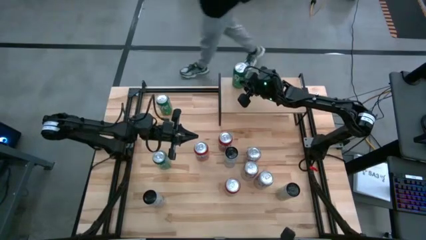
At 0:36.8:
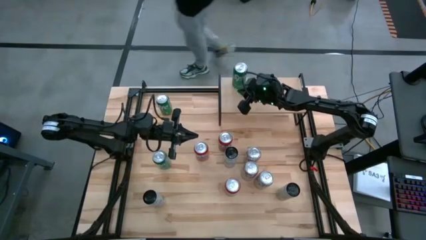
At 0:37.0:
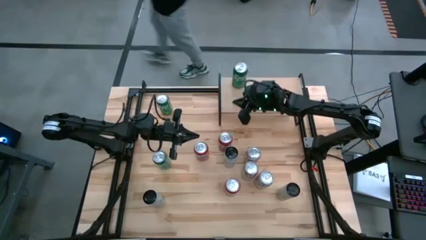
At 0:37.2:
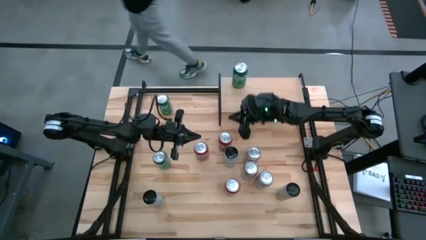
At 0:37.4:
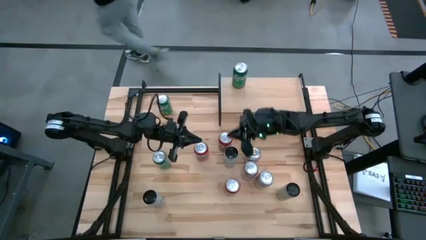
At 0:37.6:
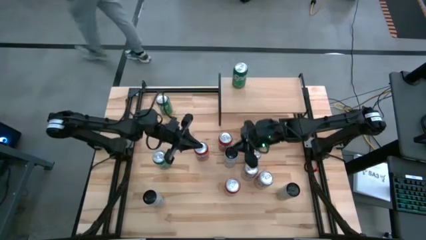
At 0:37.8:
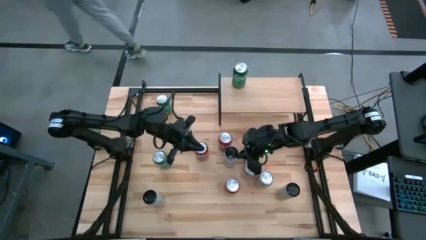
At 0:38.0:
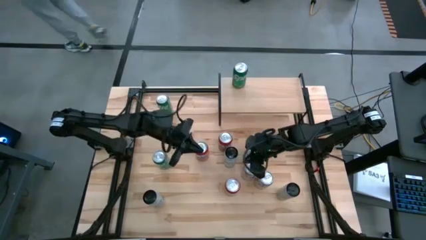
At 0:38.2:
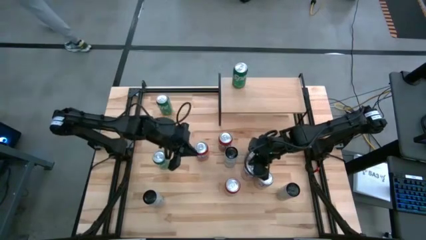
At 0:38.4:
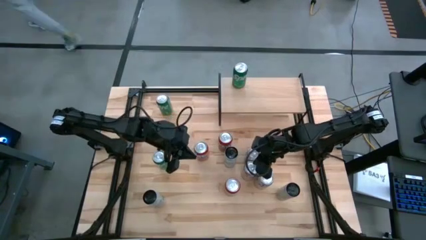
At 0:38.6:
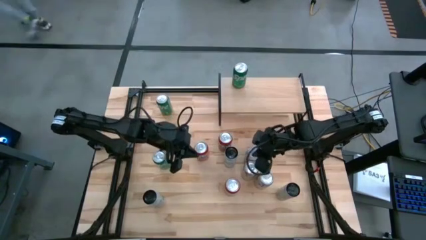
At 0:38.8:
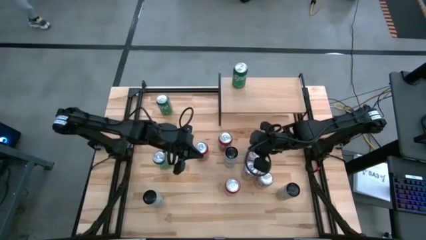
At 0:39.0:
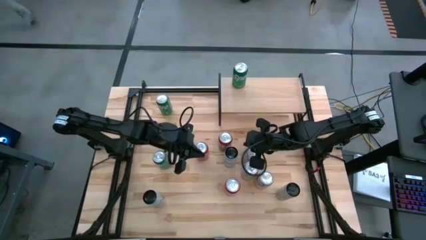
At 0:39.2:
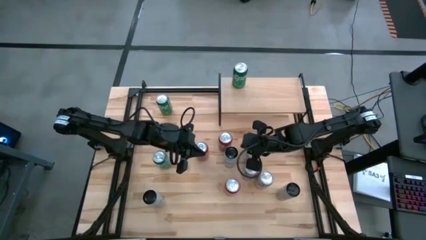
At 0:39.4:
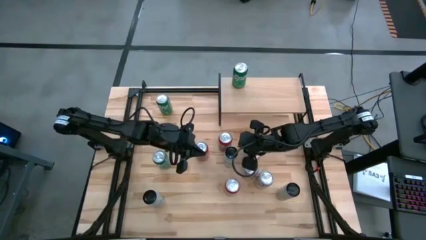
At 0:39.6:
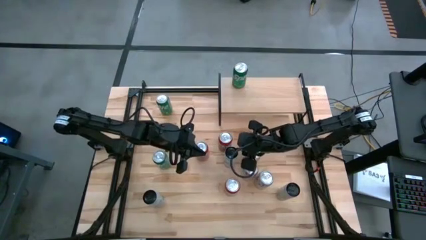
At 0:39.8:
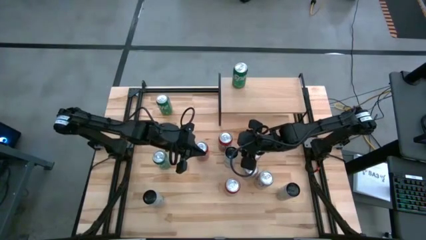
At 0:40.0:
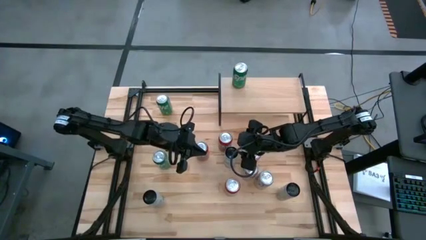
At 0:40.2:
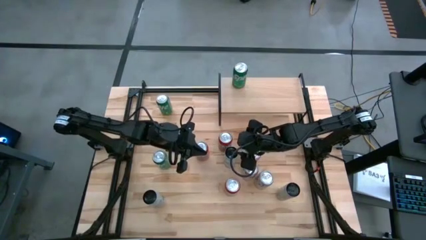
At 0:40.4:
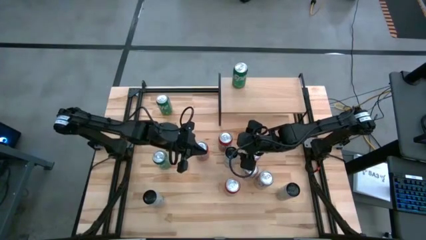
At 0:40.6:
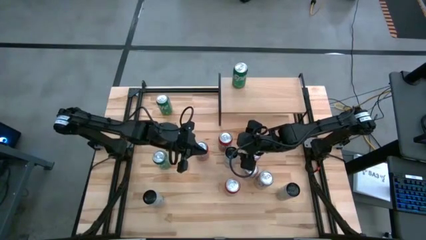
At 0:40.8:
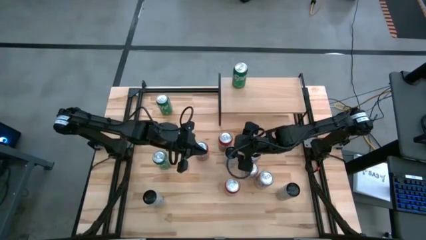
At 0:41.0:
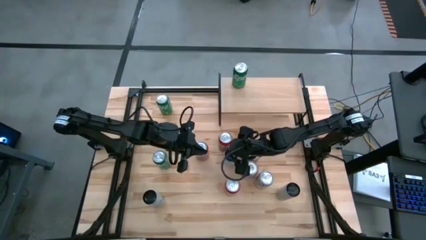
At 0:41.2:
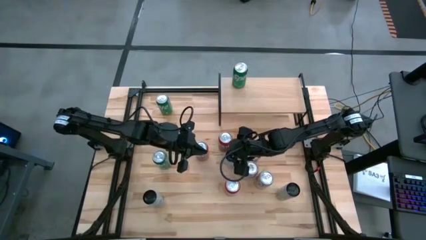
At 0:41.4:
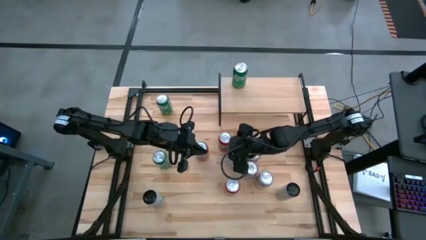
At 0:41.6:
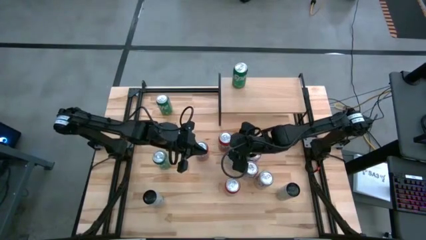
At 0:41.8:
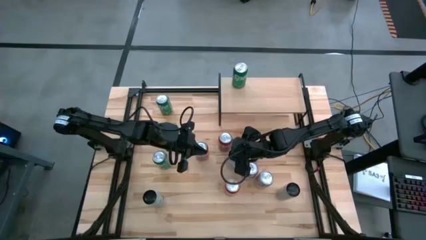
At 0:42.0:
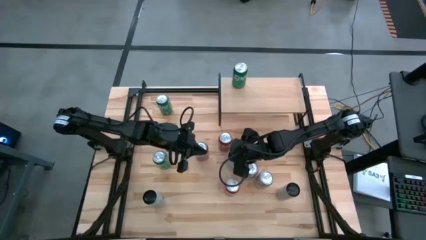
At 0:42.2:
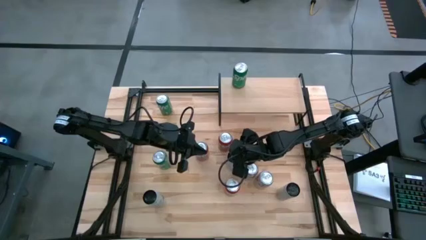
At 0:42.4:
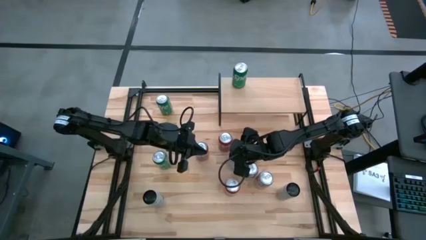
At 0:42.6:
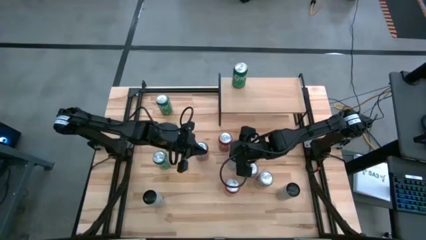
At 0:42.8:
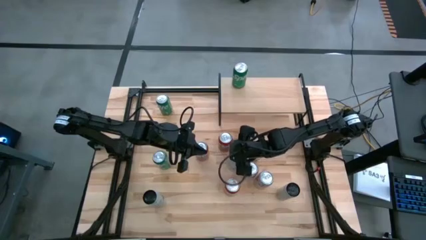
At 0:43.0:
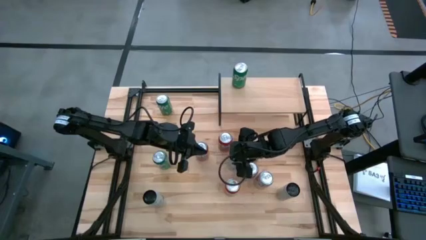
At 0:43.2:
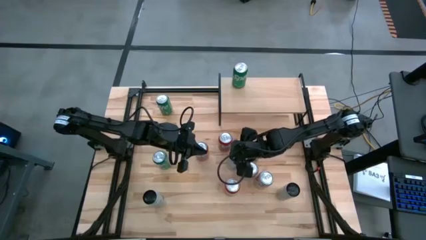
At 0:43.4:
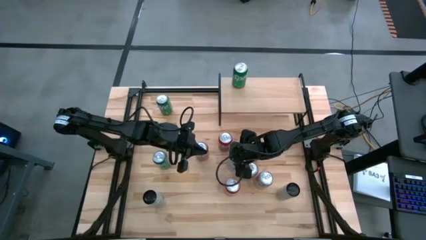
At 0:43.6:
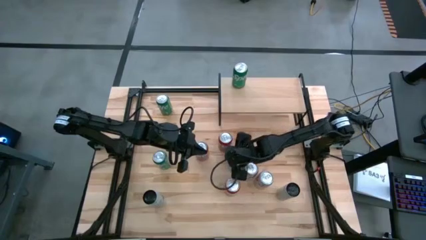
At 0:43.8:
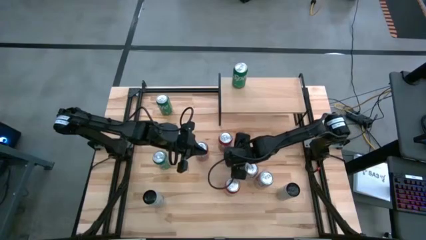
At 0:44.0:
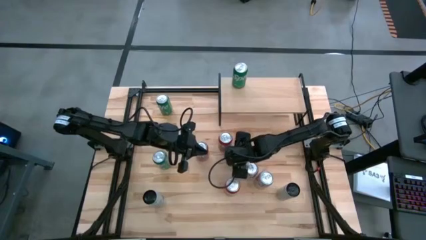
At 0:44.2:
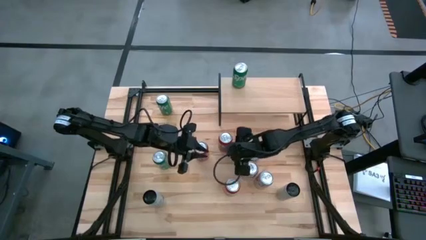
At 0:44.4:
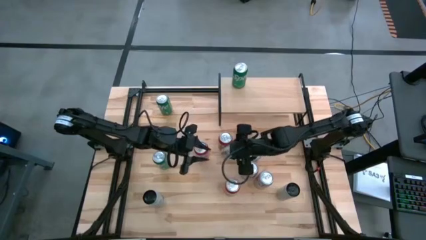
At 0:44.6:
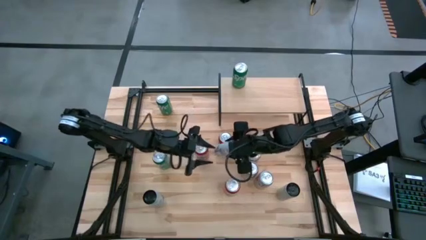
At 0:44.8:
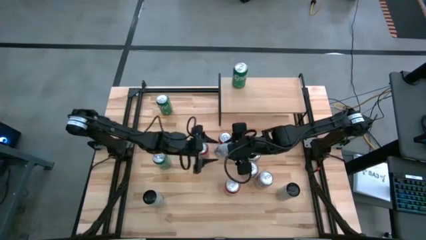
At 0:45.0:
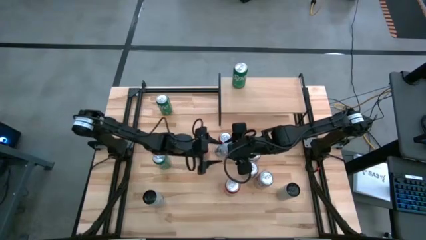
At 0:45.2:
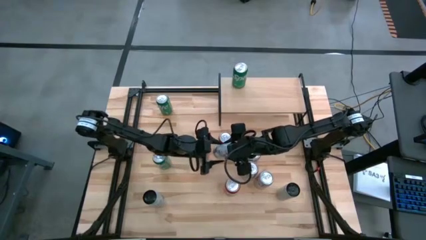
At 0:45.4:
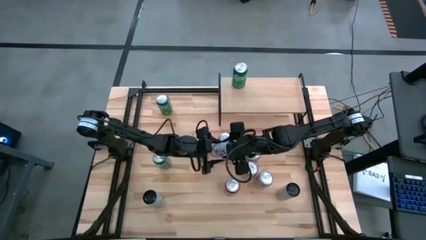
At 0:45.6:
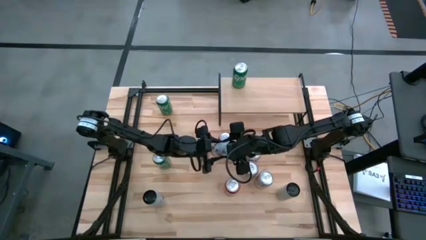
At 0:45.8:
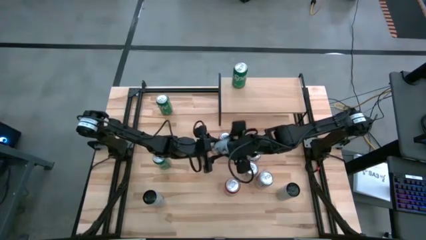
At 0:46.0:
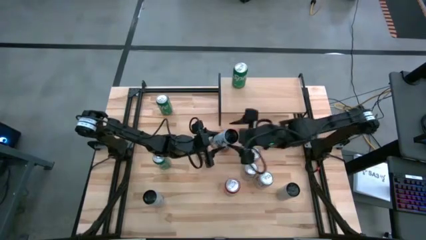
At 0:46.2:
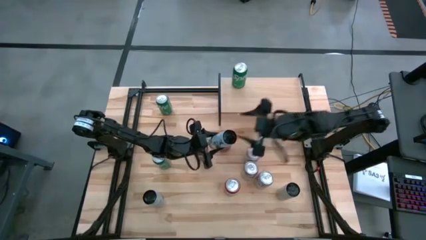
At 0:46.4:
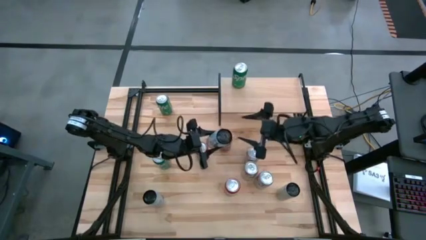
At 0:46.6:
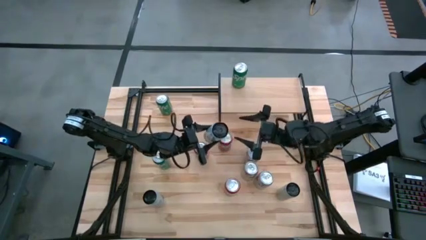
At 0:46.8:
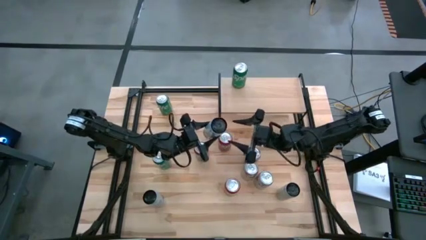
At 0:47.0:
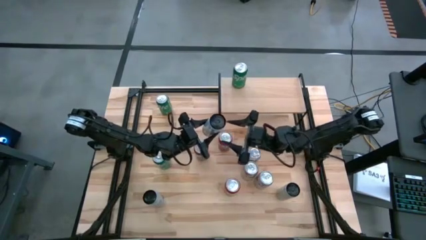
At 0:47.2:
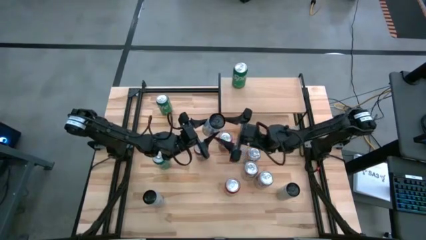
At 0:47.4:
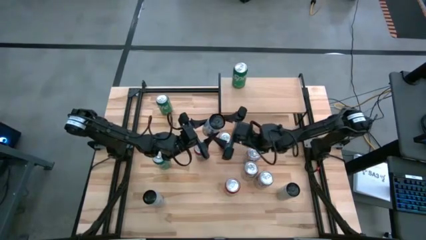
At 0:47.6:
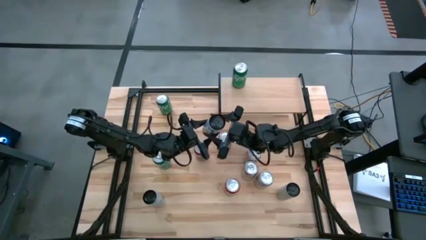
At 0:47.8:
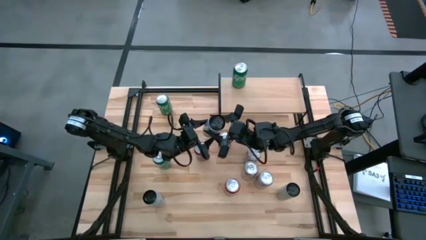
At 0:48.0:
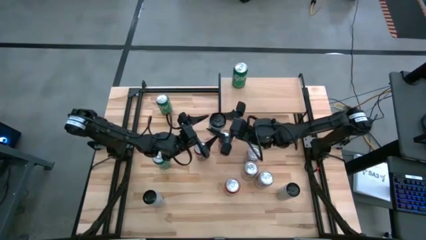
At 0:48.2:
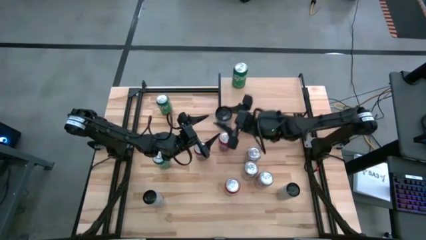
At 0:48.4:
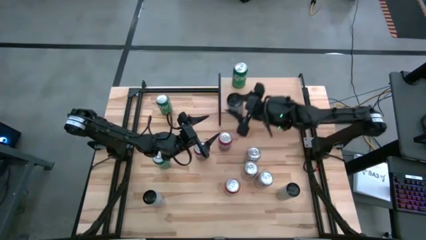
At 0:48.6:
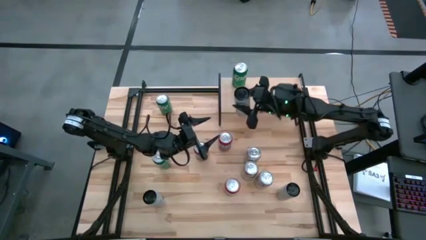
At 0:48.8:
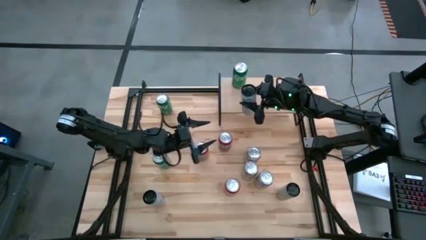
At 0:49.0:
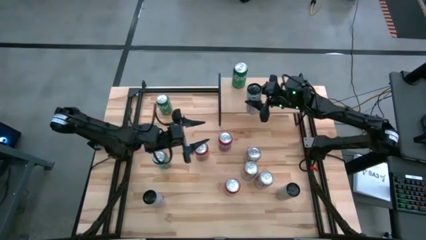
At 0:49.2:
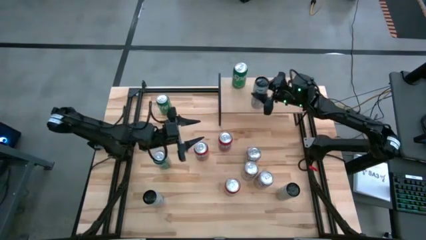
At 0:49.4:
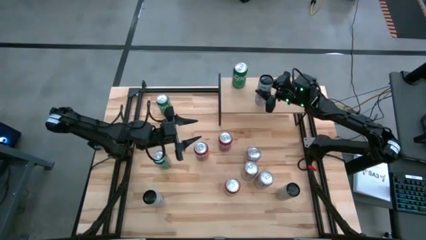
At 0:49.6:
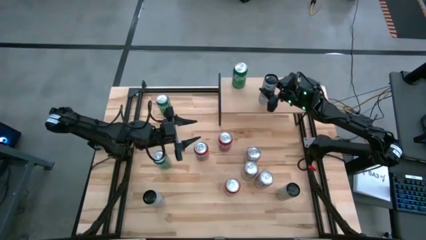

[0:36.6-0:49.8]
Task: Place canned beverage on shelf
Put the center white soda can on the shelf
